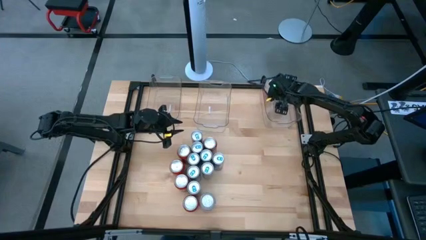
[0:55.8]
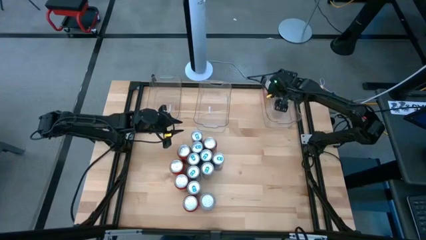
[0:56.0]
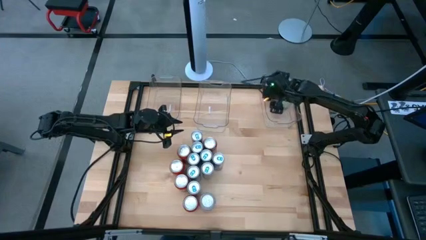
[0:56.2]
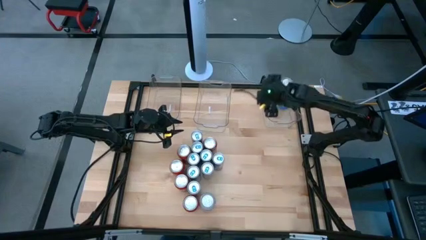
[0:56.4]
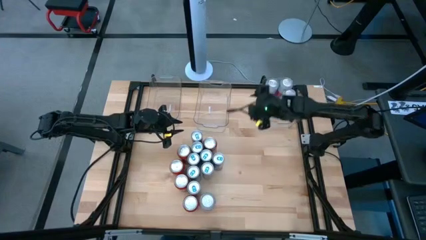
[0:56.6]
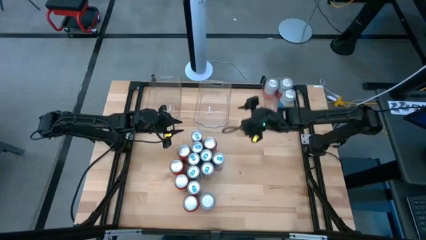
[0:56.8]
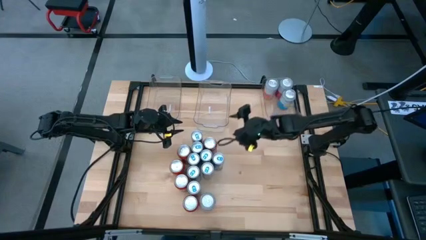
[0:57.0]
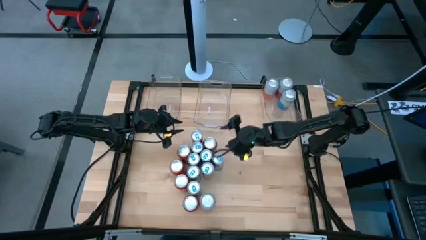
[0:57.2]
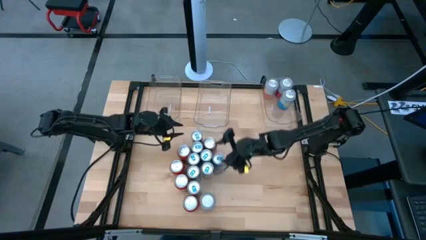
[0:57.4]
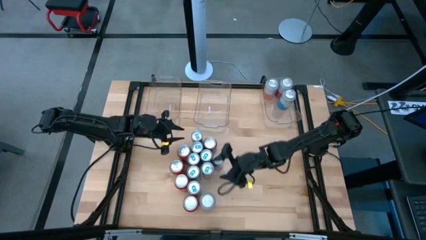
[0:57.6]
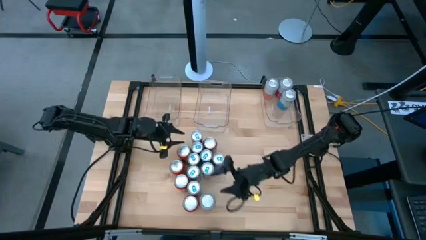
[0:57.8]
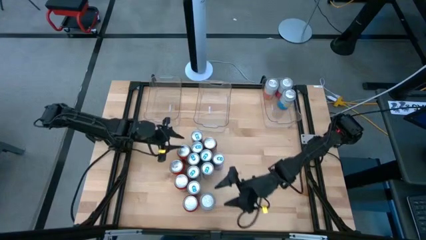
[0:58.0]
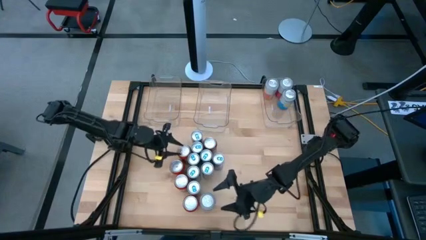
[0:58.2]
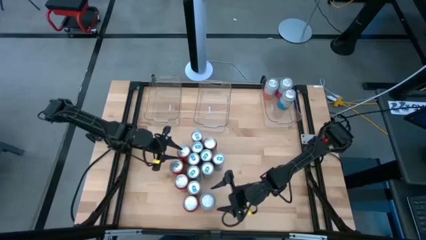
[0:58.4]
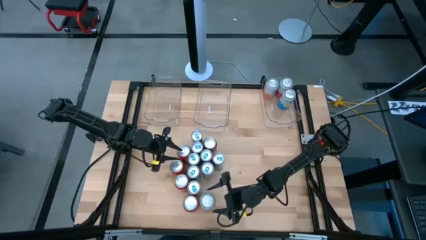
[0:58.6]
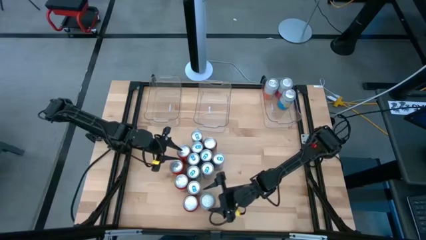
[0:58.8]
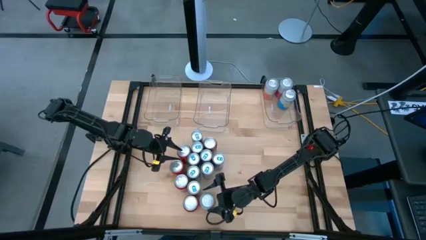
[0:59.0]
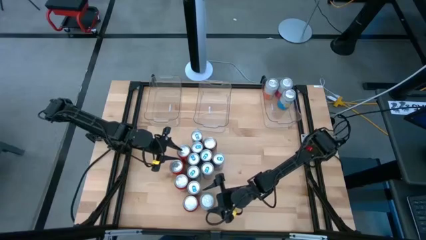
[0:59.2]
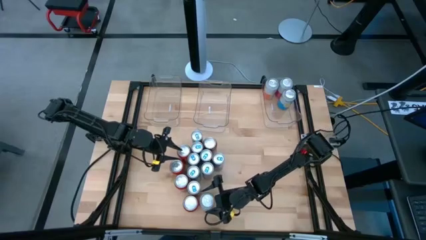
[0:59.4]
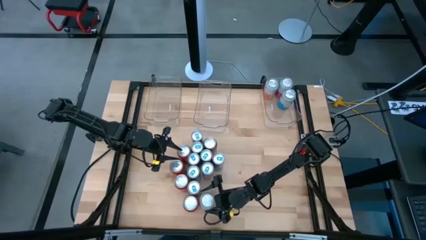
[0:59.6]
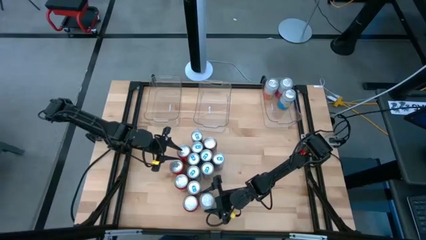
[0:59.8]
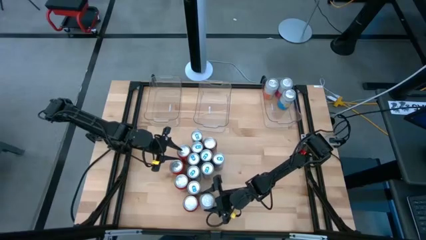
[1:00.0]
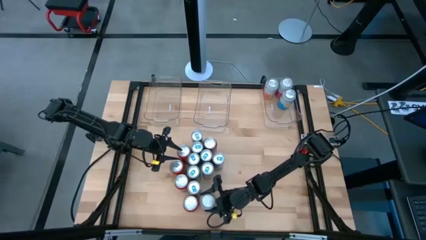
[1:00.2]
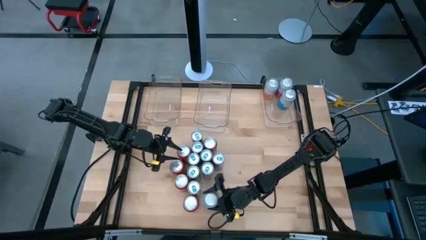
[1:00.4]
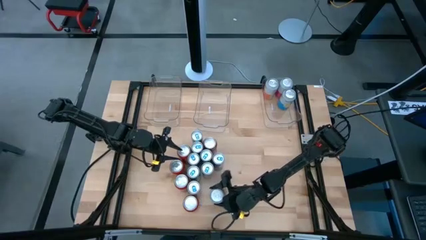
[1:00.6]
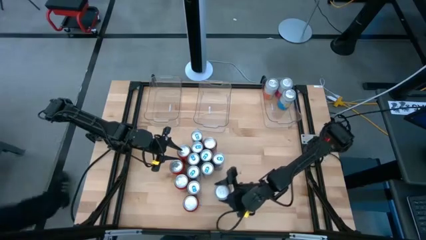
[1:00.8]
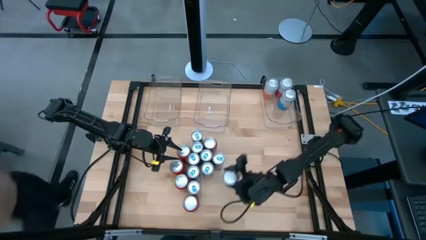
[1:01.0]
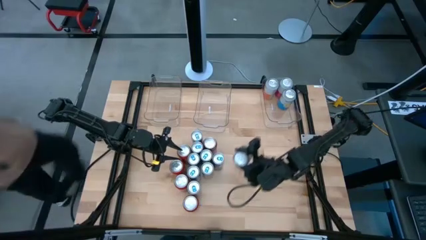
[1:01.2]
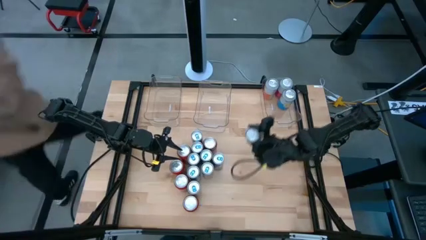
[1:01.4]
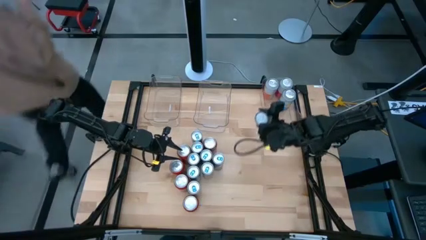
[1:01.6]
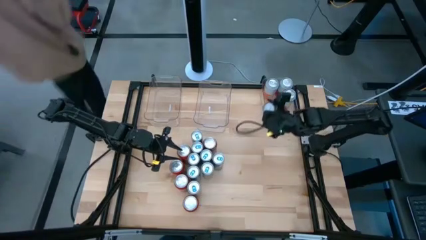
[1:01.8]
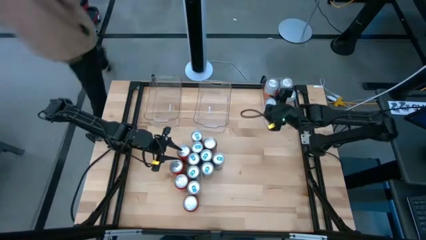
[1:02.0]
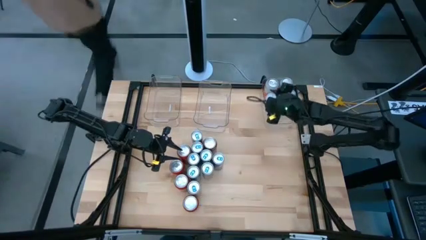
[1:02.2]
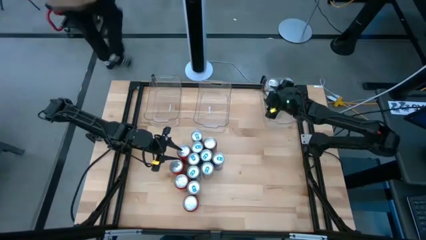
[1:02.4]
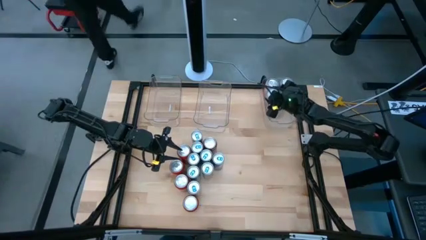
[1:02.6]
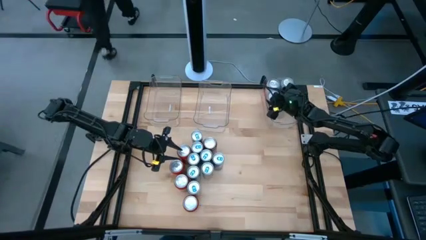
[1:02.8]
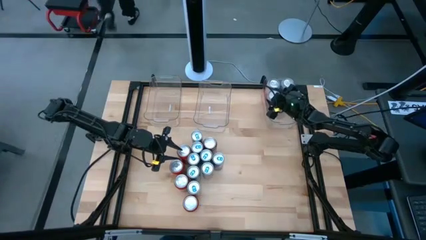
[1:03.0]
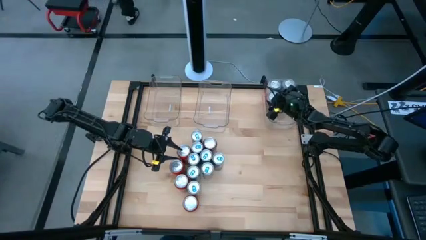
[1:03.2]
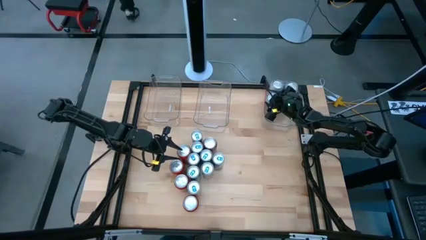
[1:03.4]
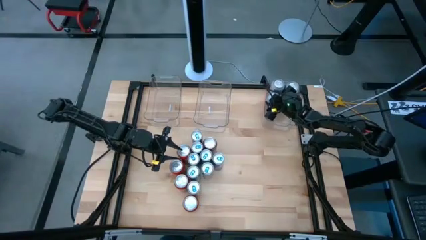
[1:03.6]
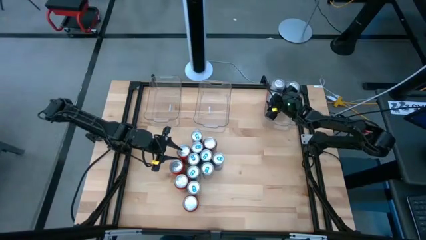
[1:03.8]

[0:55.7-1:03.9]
Task: Sort soda cans
Put the pink-white soda can into the right transparent bin

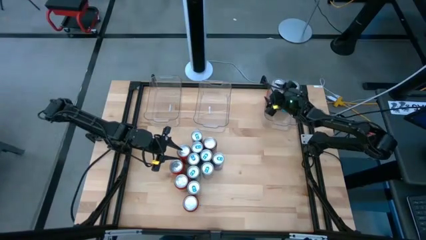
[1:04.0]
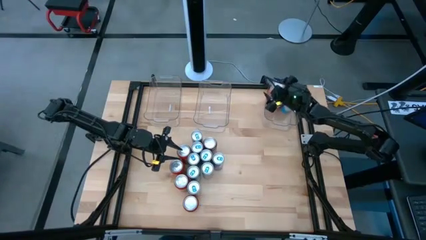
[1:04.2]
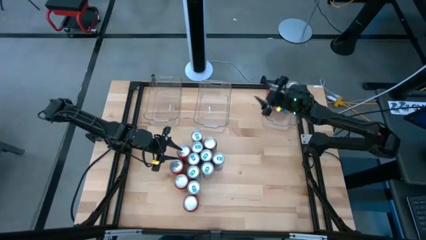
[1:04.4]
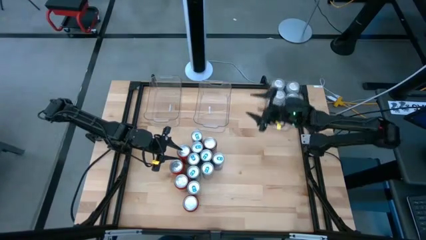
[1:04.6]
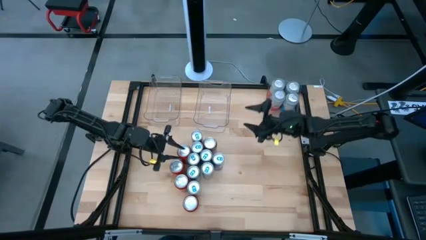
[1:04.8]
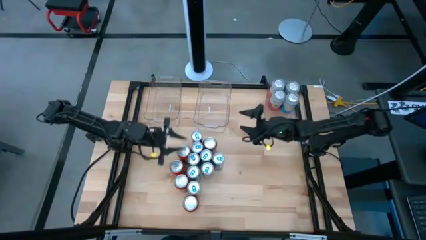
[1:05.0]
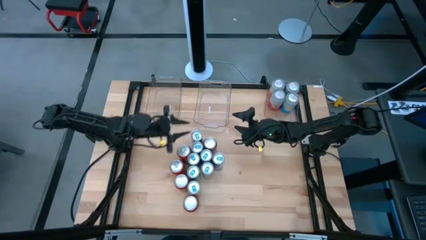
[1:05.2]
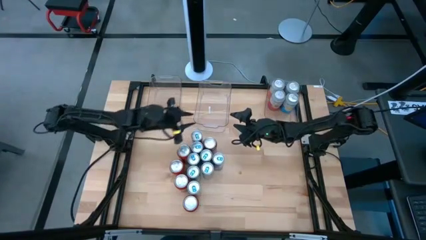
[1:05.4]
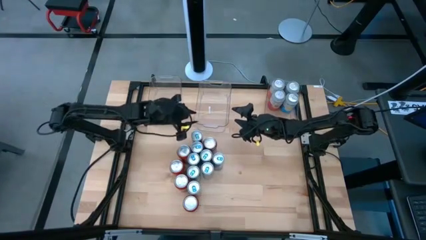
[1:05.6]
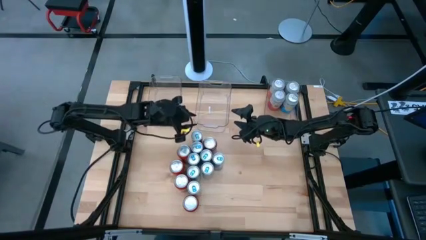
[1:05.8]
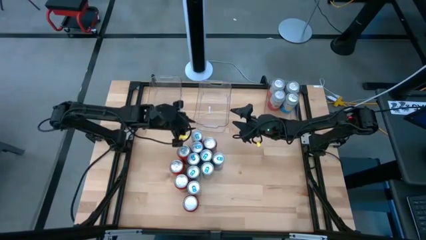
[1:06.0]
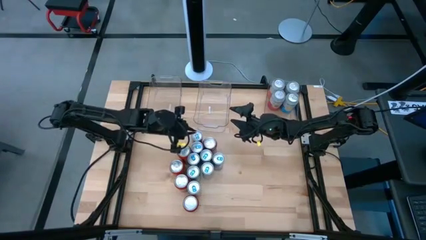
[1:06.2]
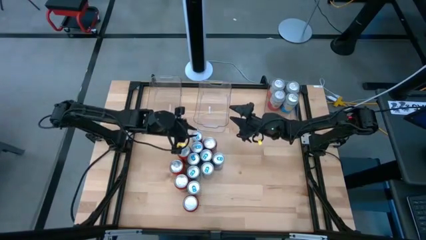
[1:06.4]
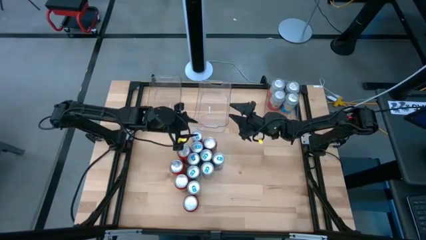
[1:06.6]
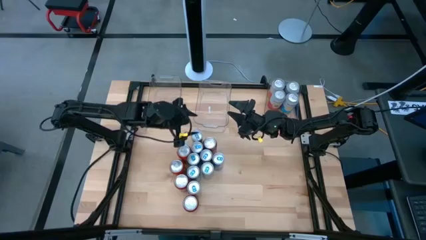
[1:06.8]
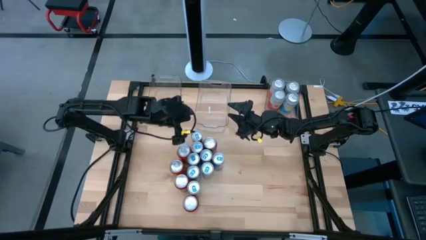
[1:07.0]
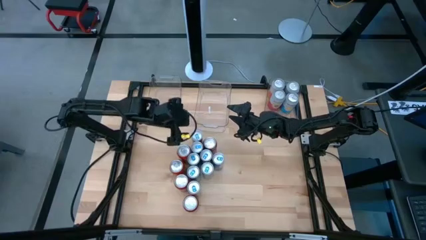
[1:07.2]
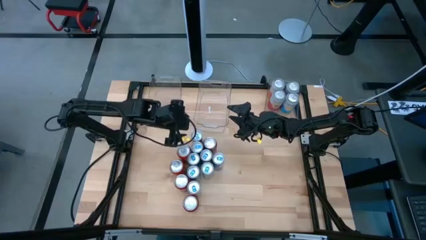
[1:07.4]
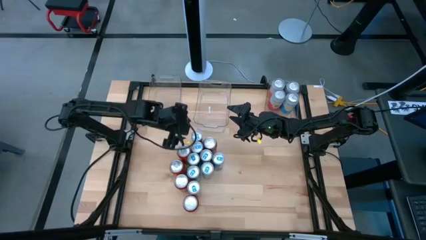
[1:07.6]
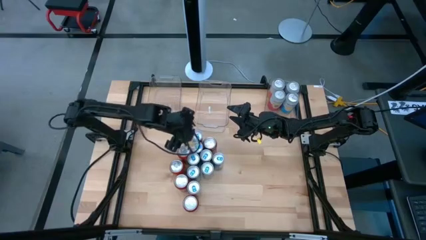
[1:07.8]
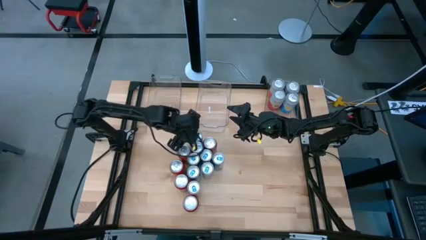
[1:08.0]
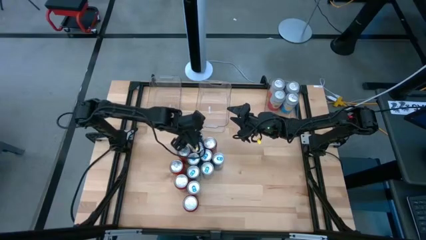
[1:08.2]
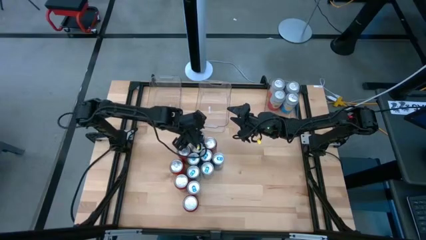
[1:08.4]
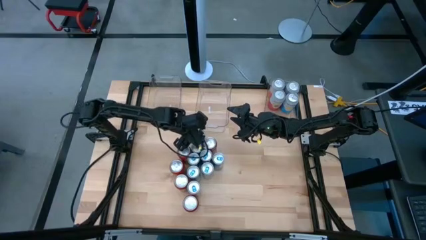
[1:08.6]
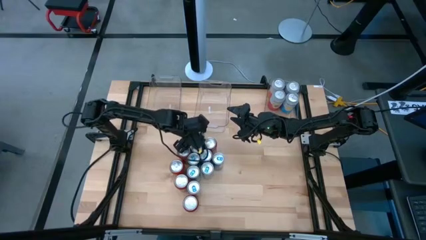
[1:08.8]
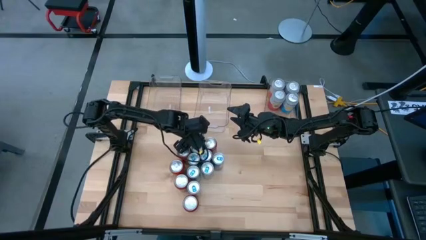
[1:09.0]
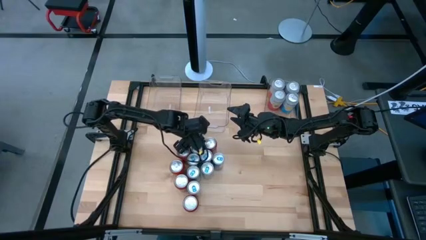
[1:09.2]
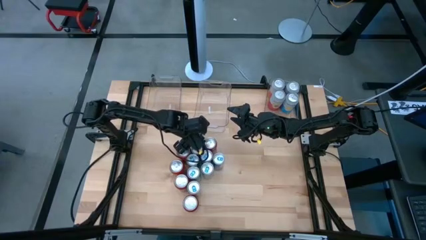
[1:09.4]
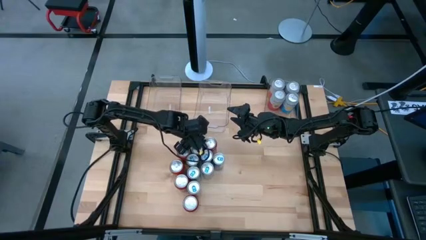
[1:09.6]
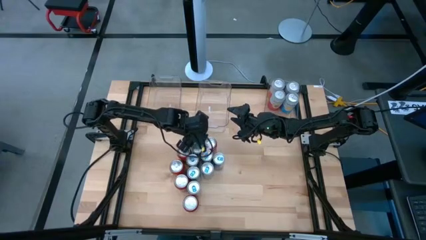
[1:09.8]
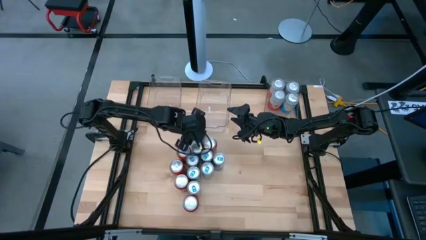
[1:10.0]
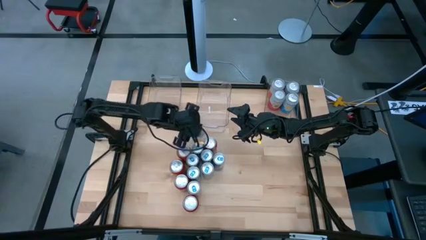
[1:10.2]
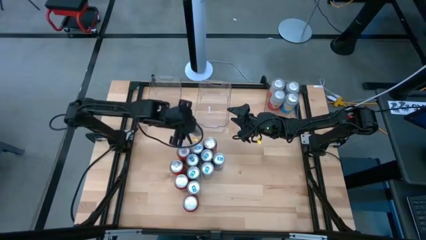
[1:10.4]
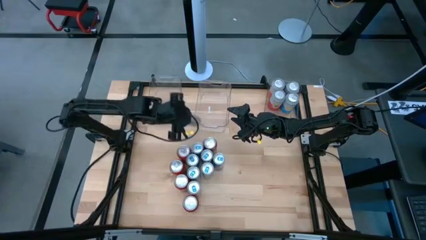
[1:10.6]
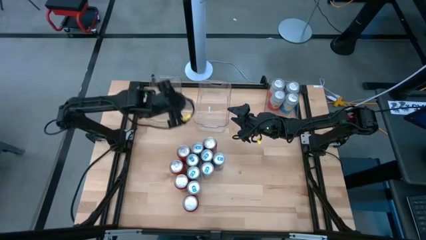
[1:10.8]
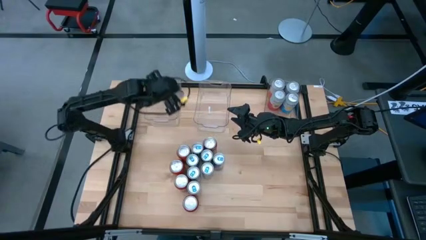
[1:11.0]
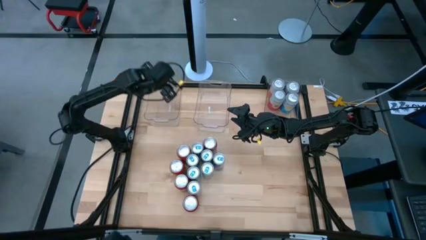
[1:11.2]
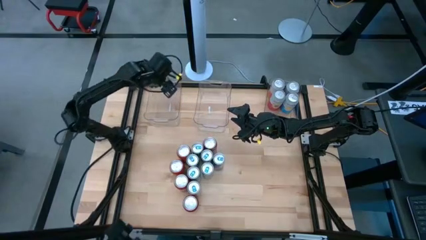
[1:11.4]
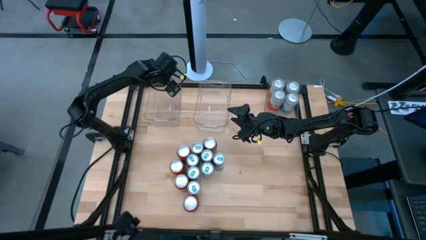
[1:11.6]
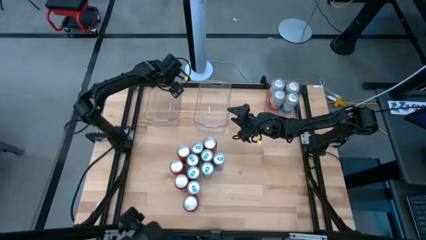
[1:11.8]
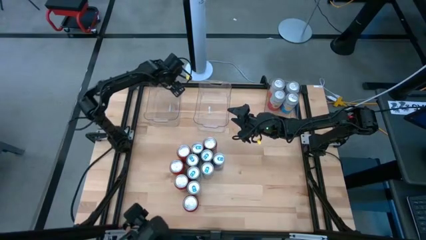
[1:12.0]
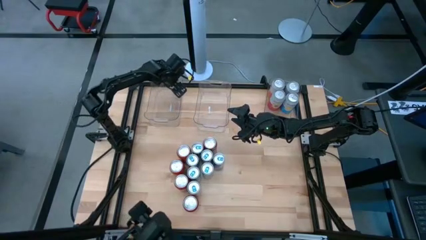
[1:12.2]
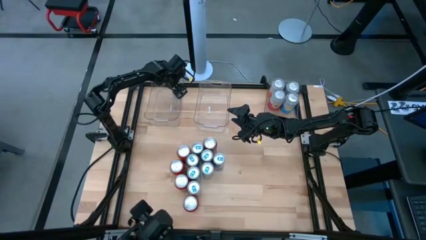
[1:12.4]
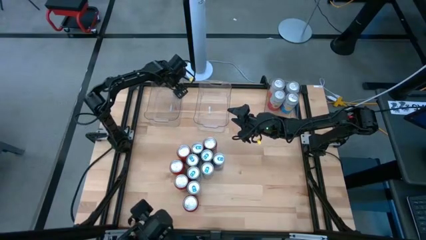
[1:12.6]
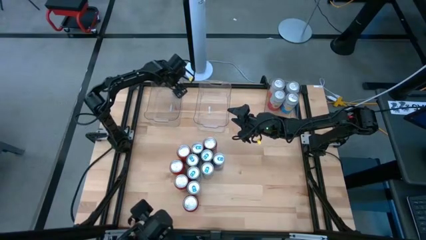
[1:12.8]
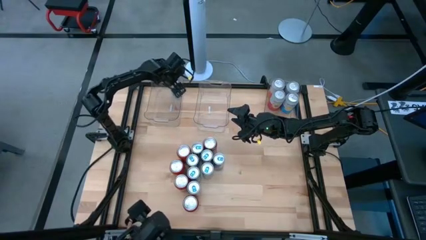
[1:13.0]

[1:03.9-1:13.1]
Put the blue soda can into the left transparent bin
